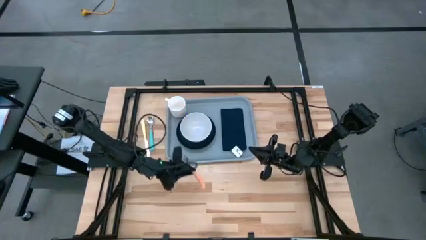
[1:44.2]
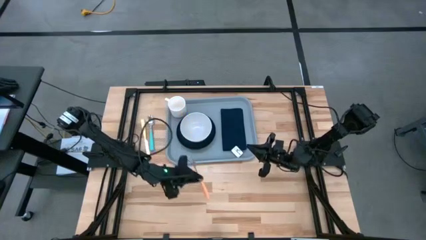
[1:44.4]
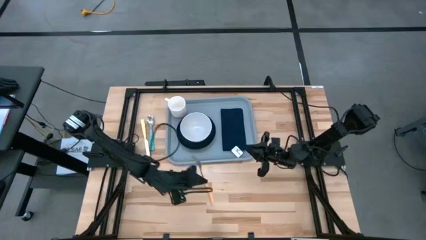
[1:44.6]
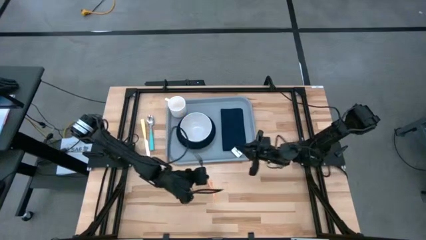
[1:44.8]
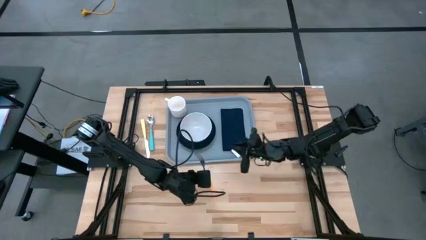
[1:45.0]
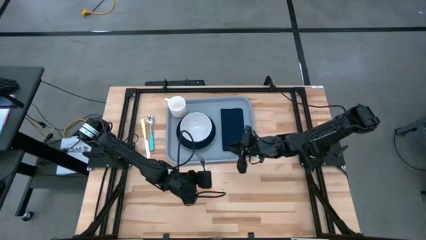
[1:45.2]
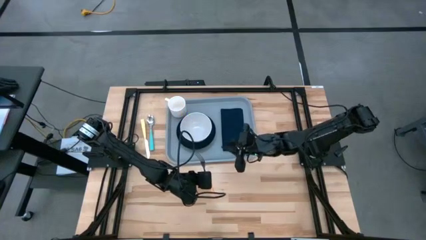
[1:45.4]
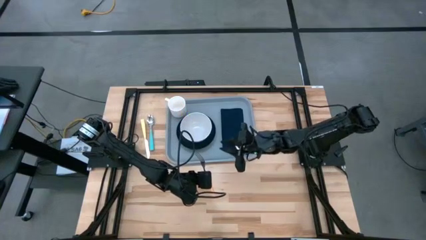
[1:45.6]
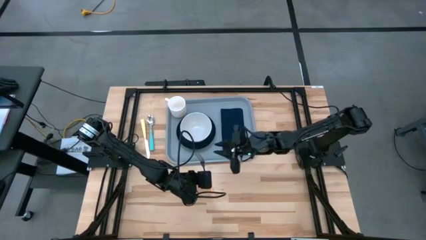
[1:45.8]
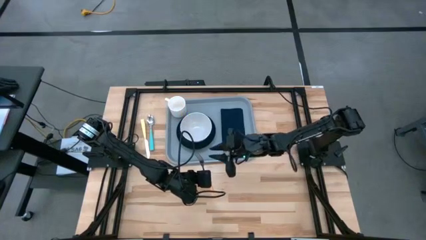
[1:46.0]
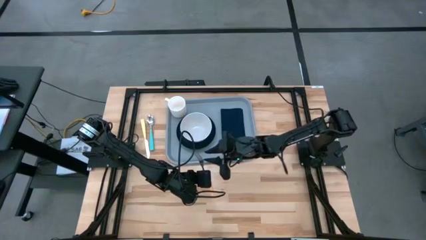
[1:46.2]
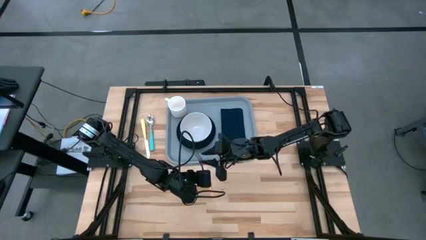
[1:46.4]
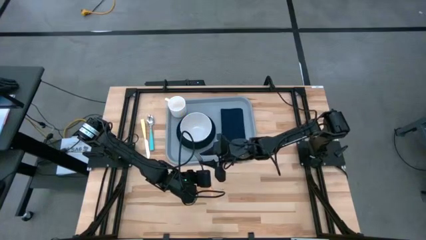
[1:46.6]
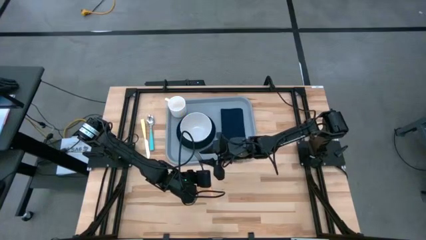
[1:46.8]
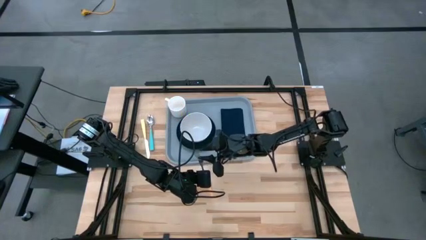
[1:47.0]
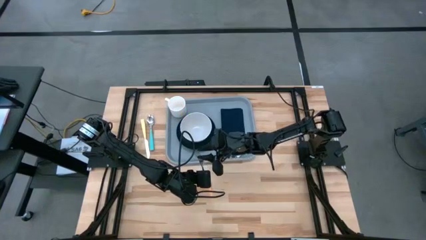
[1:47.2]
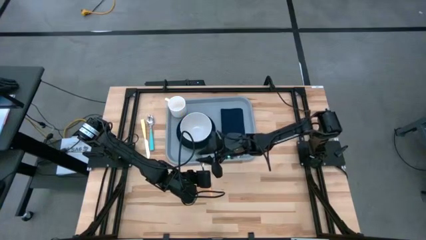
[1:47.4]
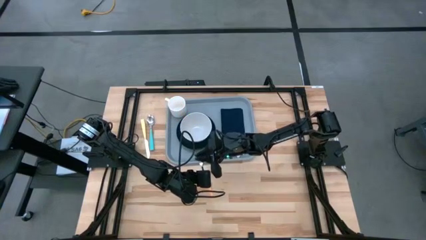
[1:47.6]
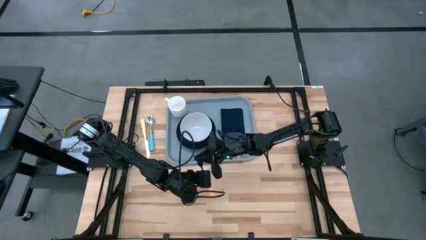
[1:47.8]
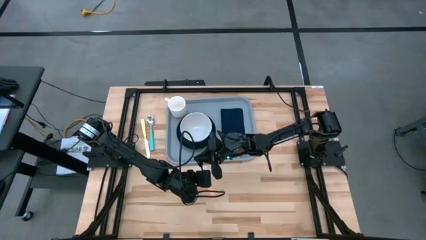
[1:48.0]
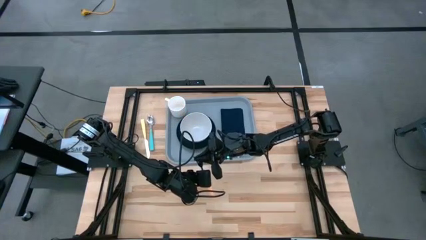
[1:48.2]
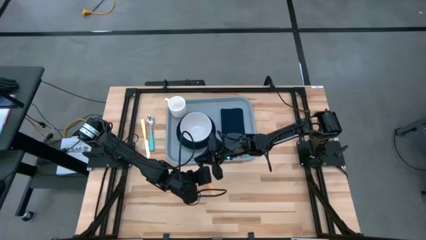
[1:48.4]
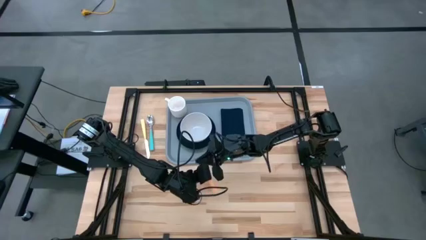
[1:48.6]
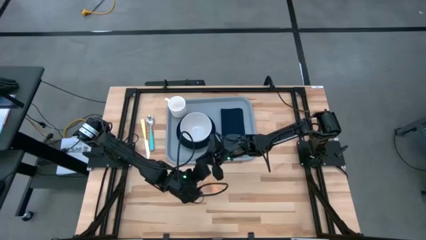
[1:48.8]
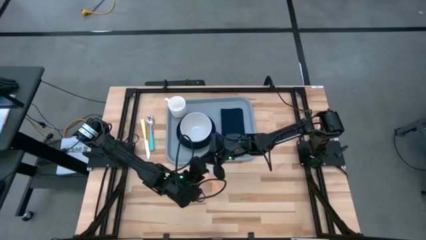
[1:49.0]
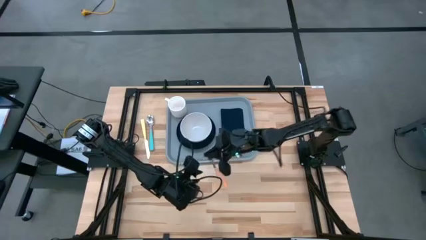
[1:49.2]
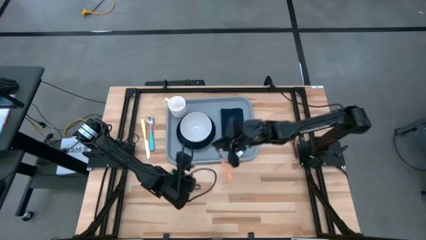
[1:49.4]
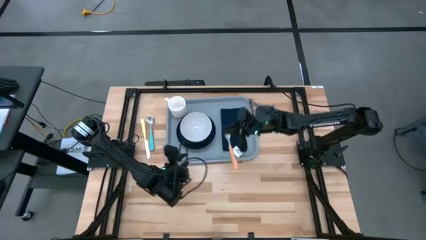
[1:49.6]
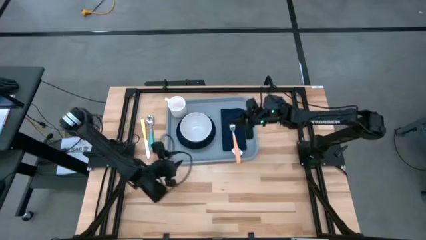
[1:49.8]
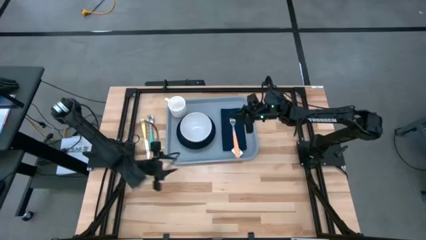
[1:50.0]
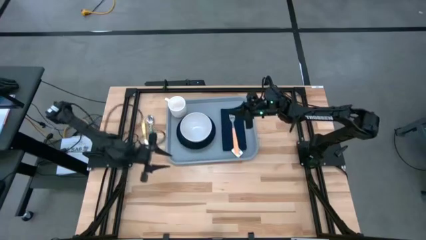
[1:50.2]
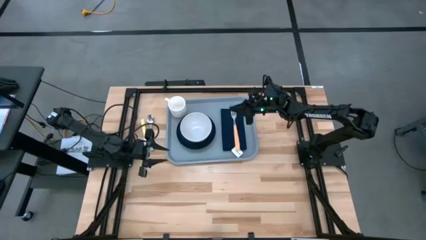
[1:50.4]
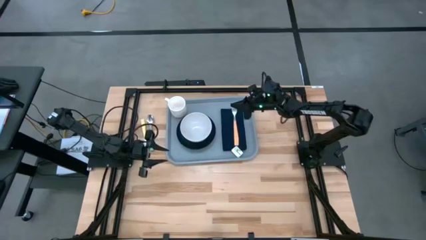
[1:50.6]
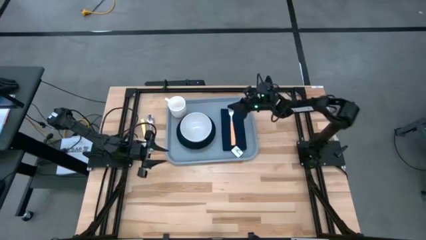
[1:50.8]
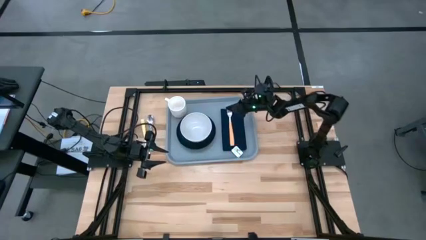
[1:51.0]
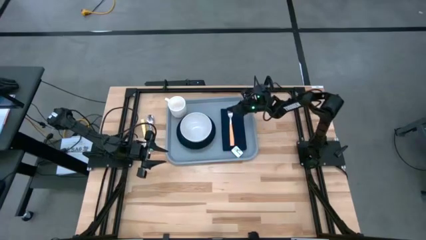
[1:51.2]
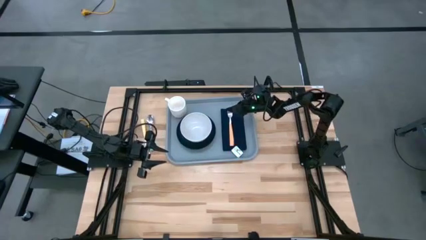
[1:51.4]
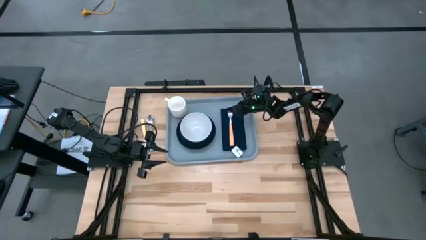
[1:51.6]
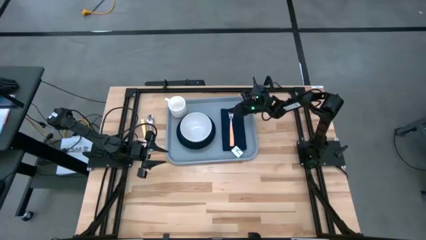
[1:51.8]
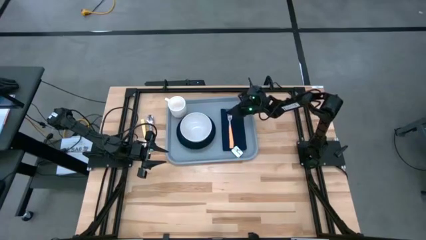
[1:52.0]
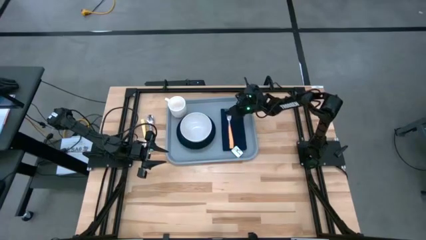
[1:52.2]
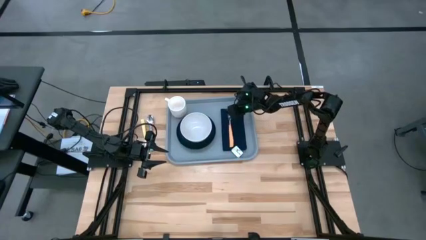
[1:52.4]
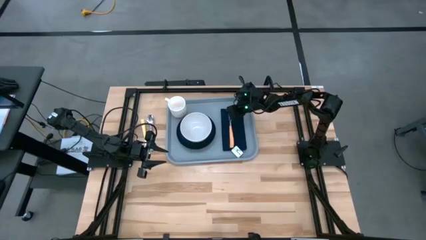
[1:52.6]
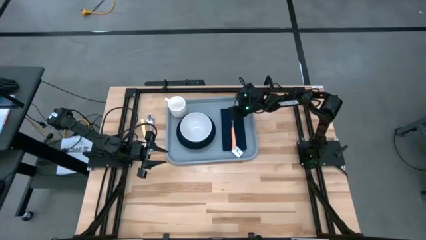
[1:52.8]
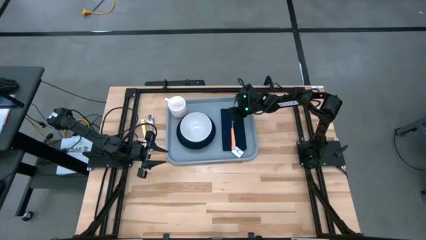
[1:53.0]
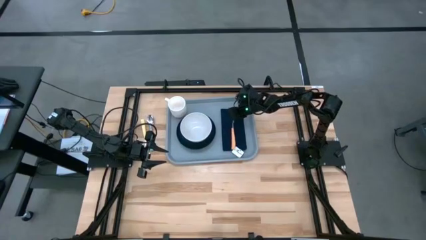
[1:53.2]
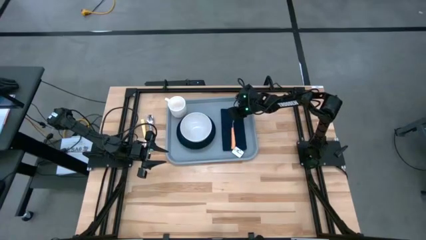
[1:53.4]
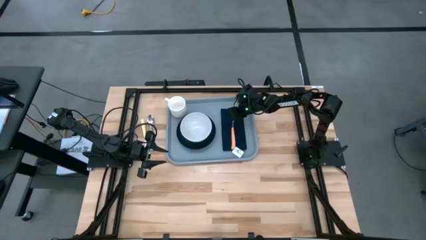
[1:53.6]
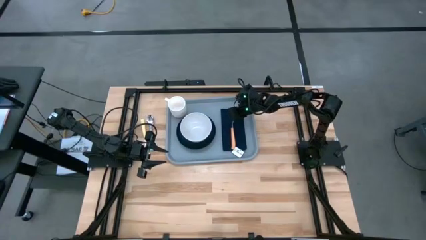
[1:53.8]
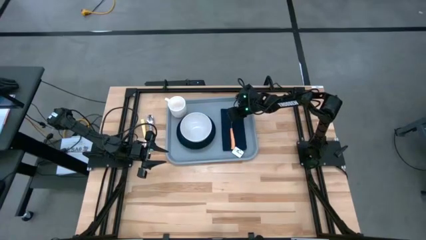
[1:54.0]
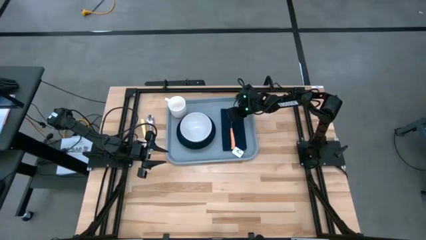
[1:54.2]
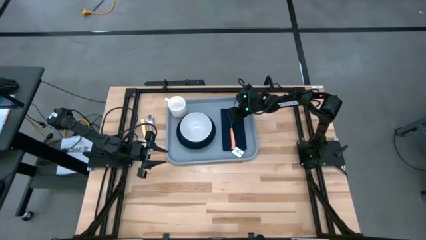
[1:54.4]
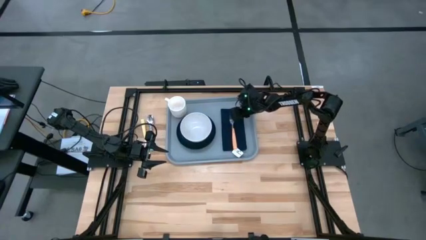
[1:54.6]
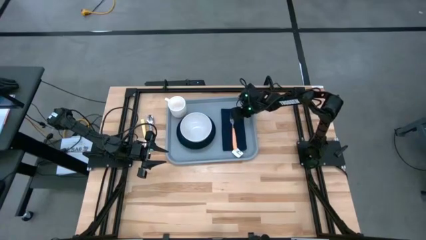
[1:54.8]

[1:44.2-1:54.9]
Task: Set up tray
Put the orange fork on the black napkin

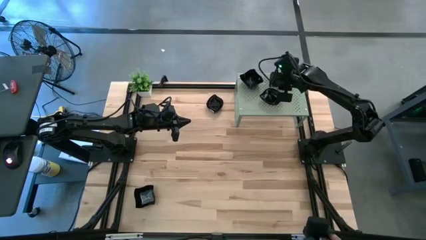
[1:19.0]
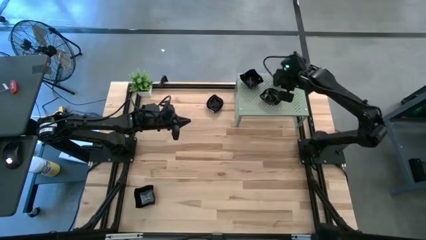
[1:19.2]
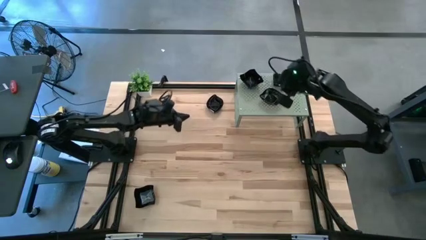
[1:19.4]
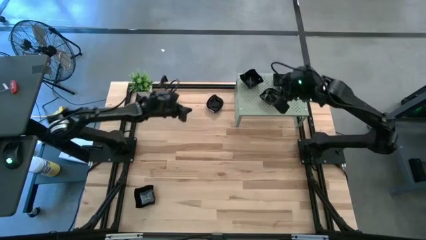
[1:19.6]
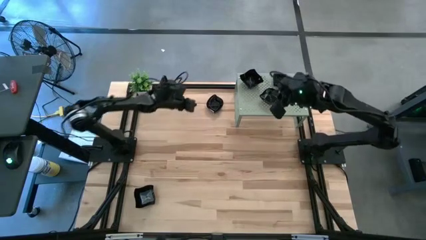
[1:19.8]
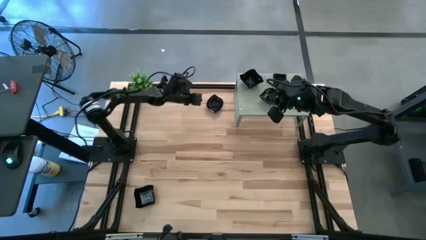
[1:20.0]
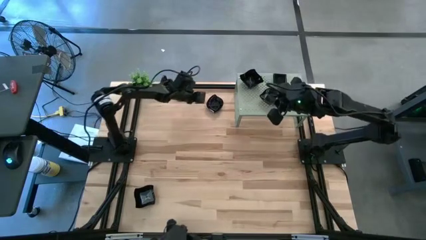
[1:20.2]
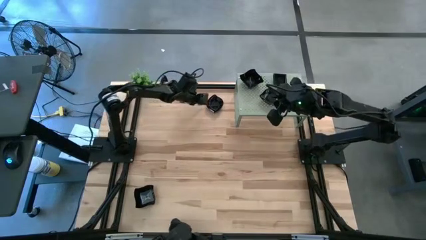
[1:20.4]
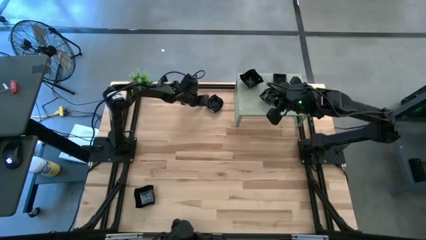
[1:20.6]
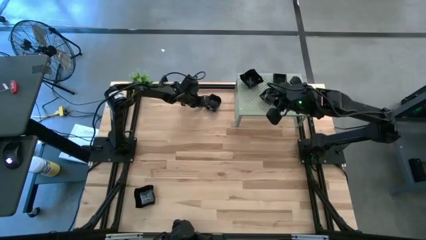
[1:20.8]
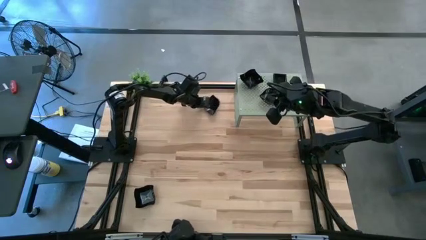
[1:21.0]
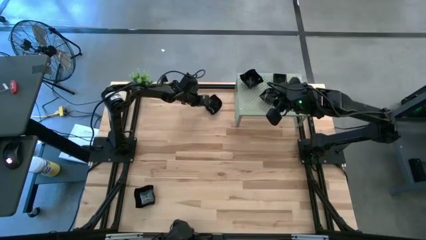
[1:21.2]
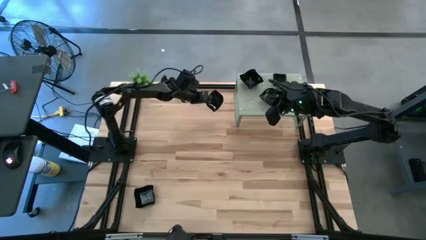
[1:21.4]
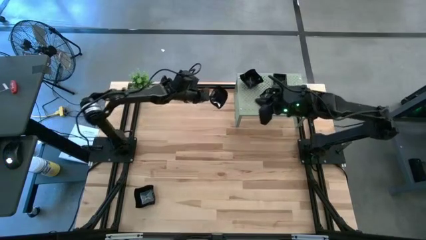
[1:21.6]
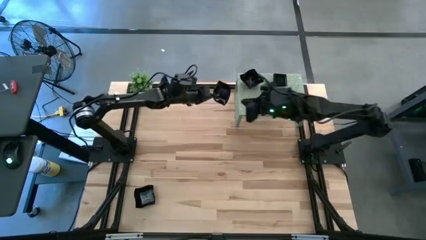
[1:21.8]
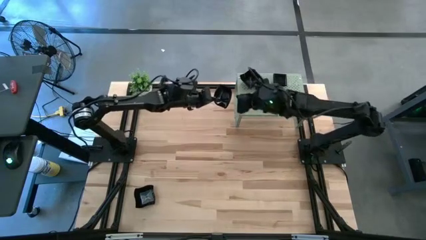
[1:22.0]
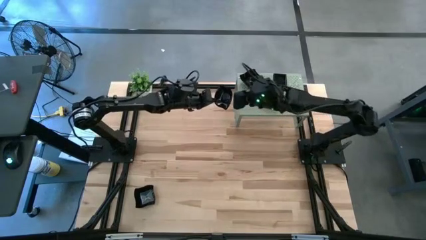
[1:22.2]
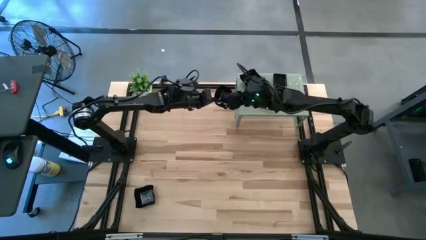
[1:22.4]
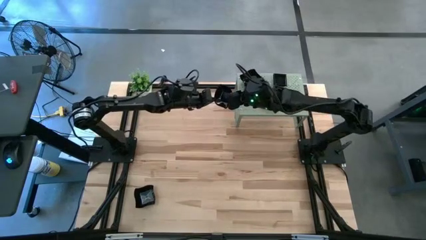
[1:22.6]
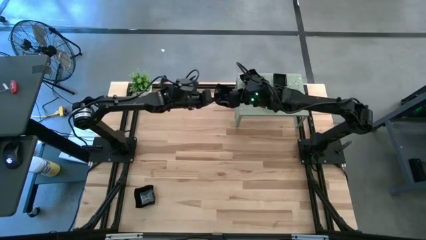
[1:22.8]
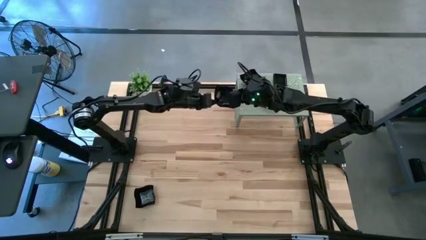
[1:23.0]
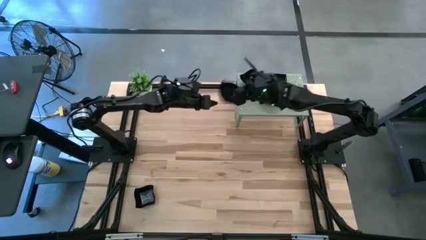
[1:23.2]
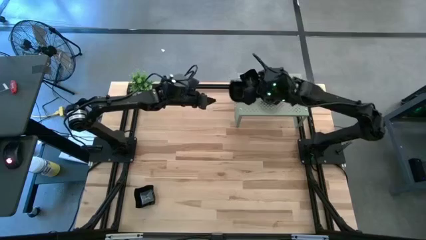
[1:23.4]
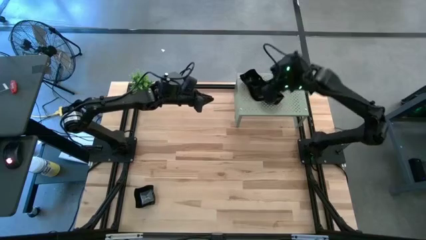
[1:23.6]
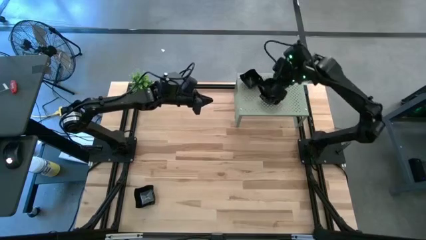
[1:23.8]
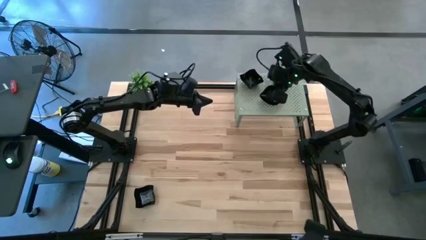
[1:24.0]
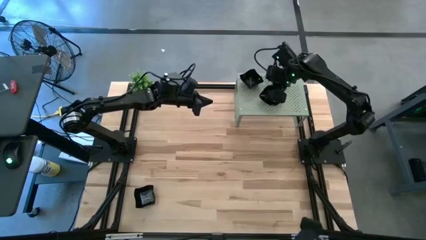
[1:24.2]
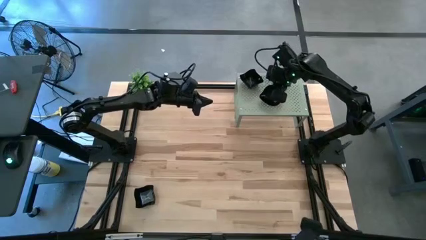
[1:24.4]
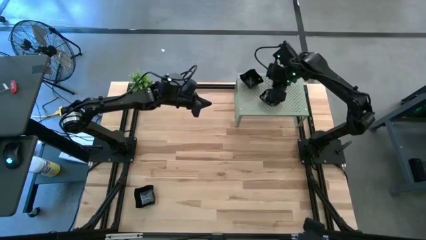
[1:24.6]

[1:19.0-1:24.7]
Task: Pick & Place Mini shaped plates
Stack the leaf-shaped plate on top of the leaf-shaped plates on the shelf
